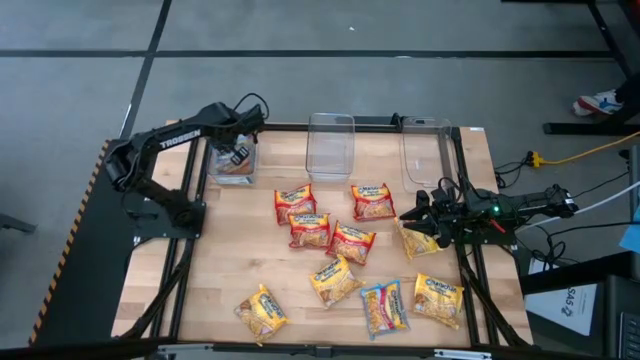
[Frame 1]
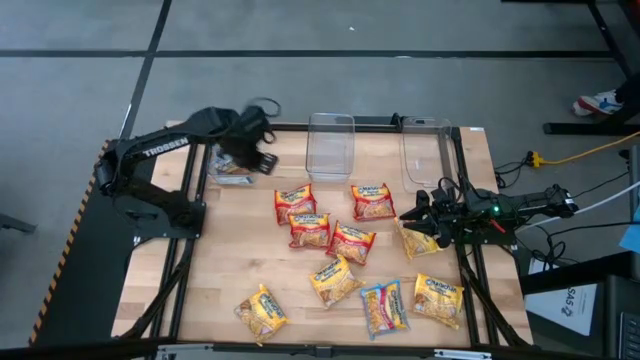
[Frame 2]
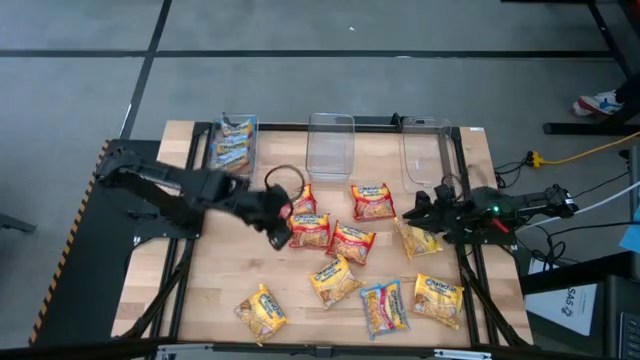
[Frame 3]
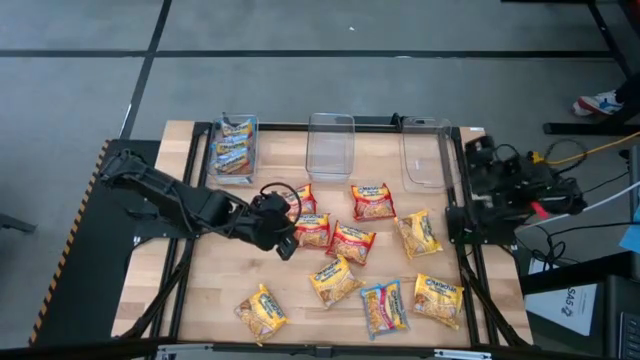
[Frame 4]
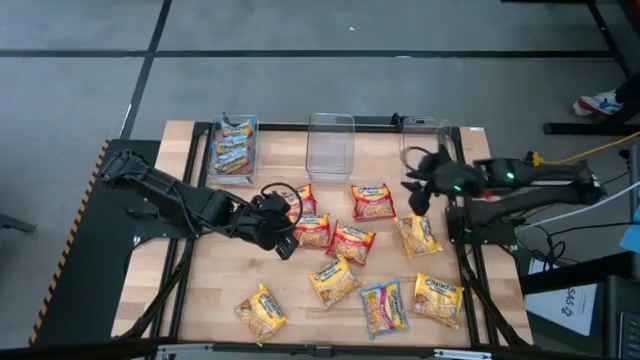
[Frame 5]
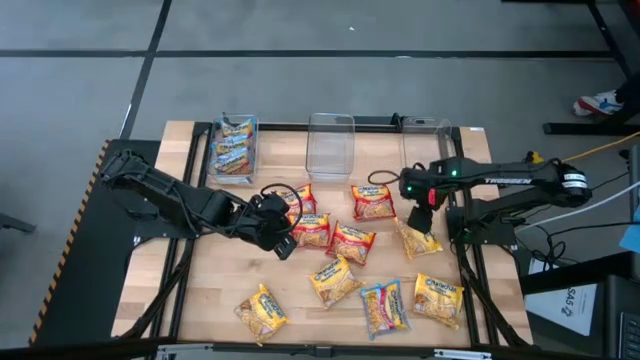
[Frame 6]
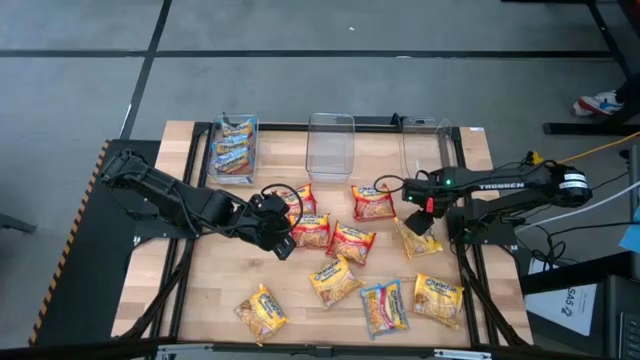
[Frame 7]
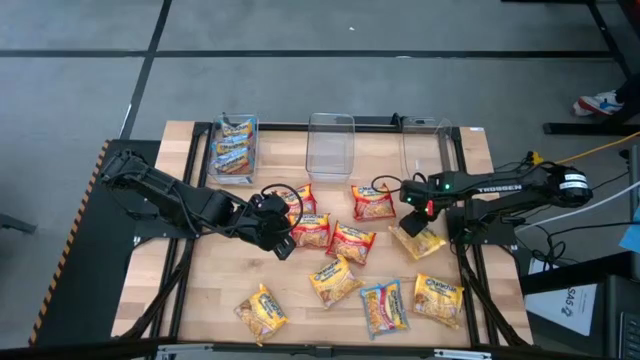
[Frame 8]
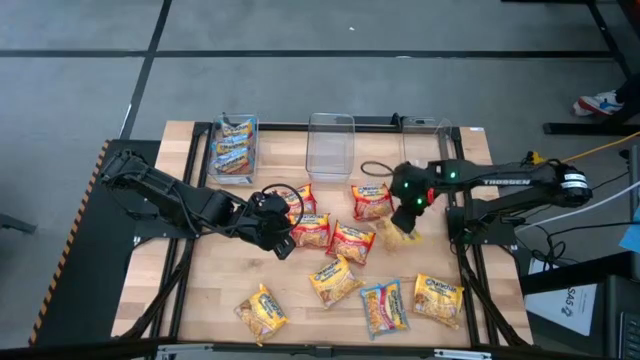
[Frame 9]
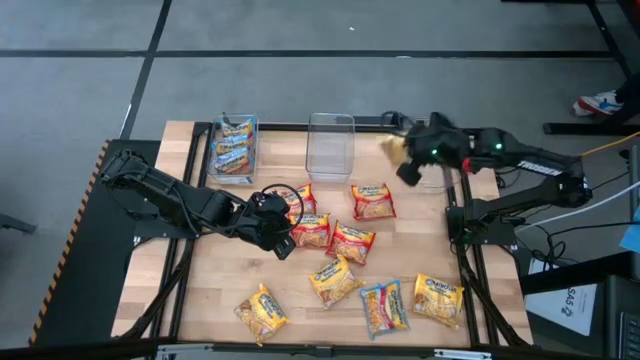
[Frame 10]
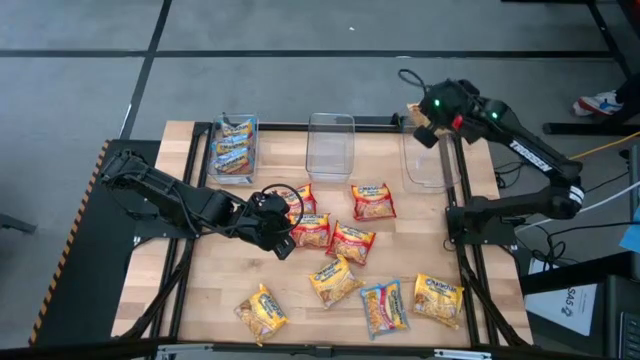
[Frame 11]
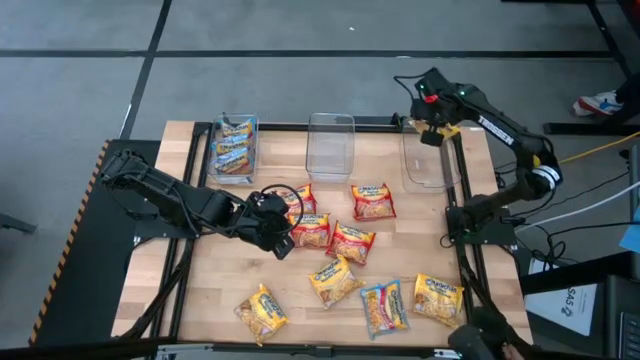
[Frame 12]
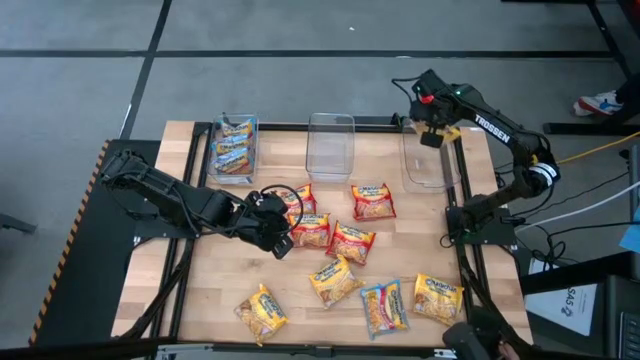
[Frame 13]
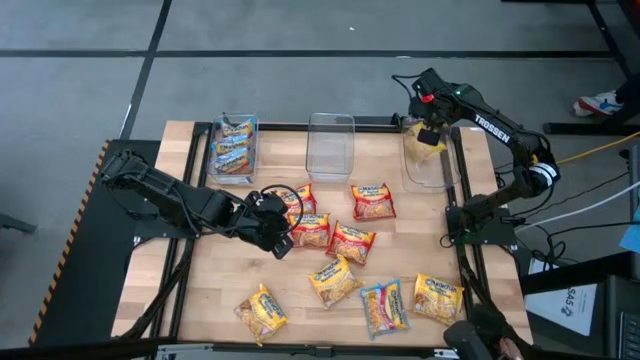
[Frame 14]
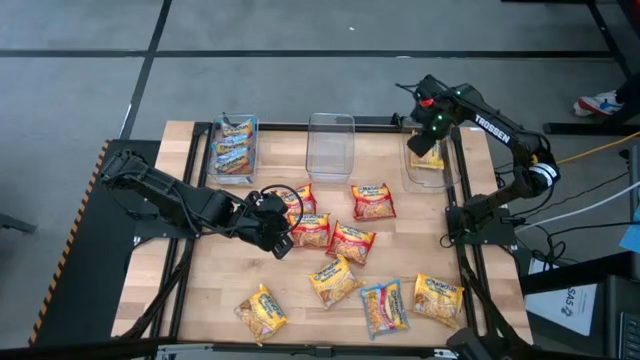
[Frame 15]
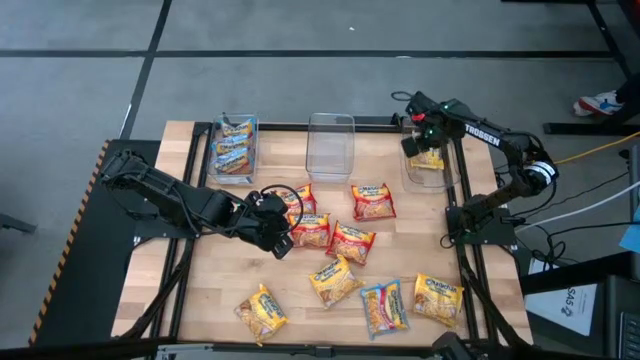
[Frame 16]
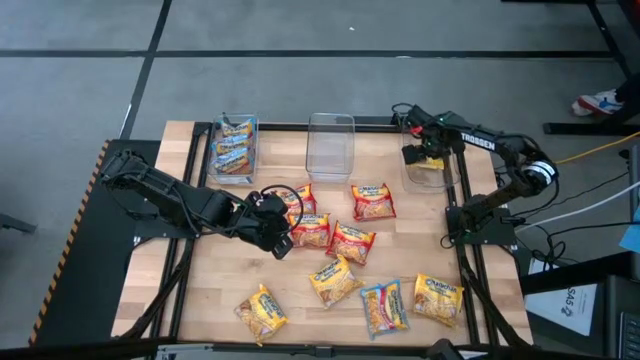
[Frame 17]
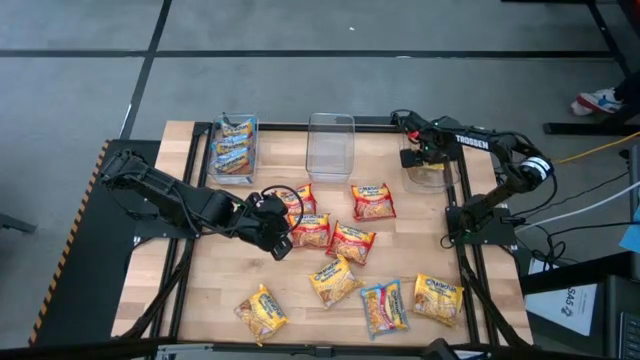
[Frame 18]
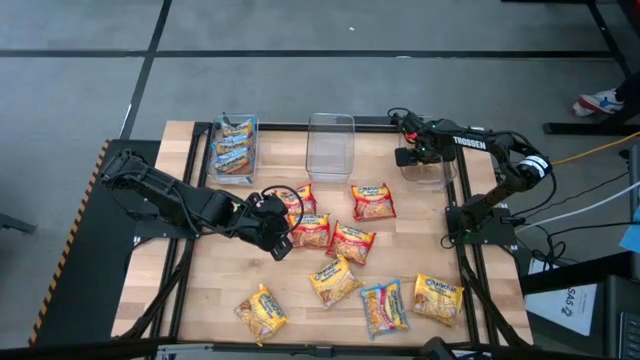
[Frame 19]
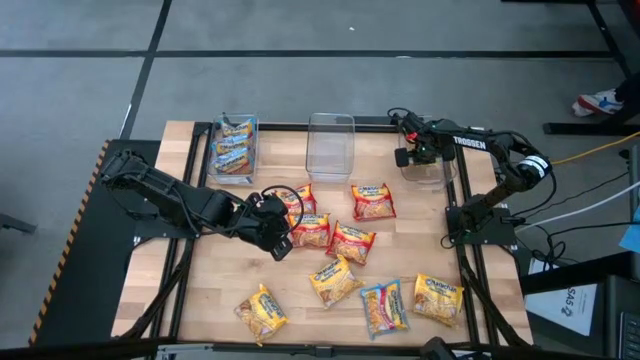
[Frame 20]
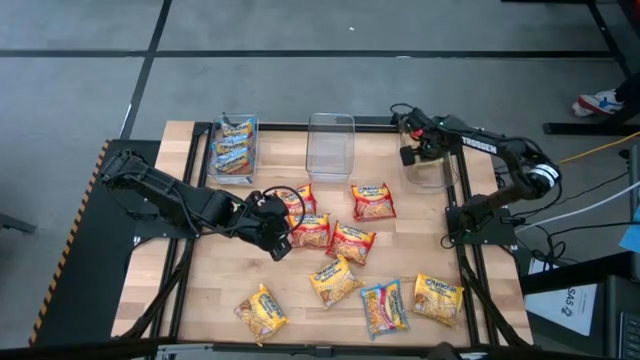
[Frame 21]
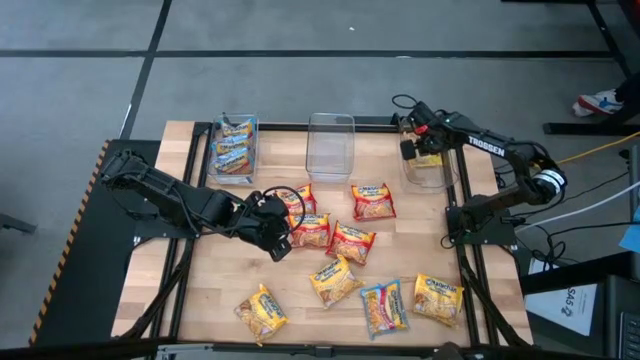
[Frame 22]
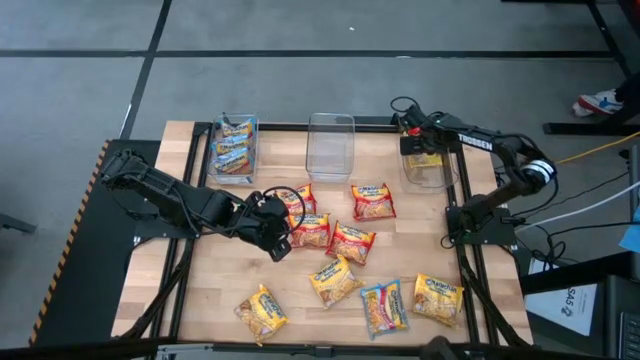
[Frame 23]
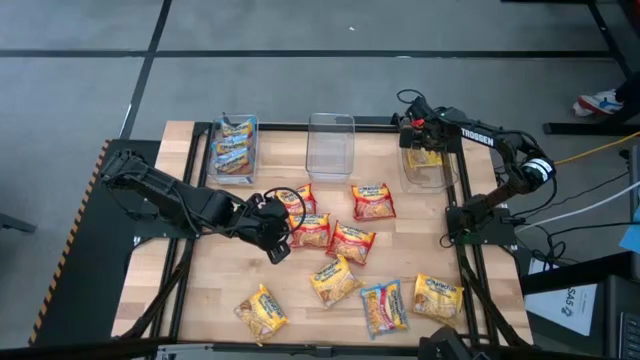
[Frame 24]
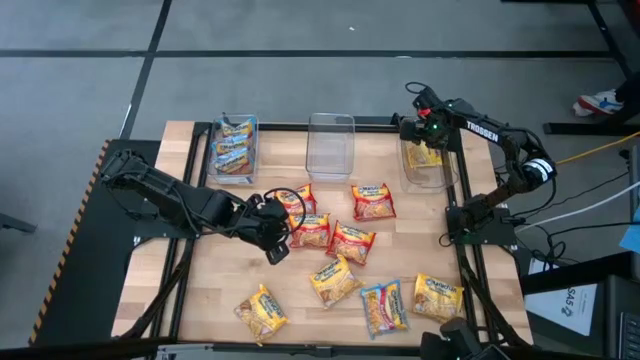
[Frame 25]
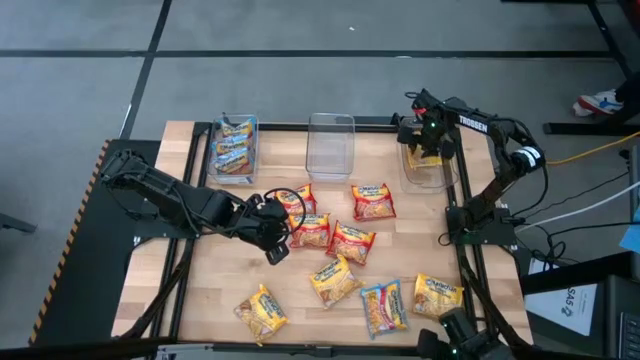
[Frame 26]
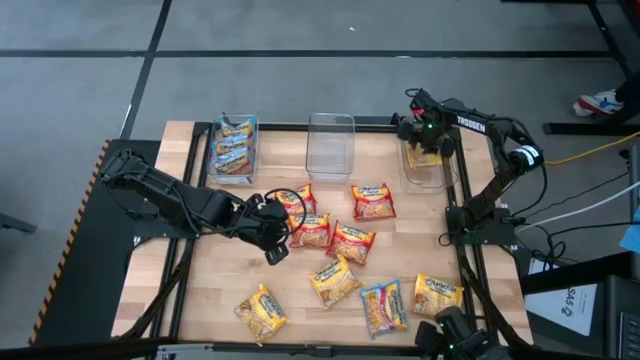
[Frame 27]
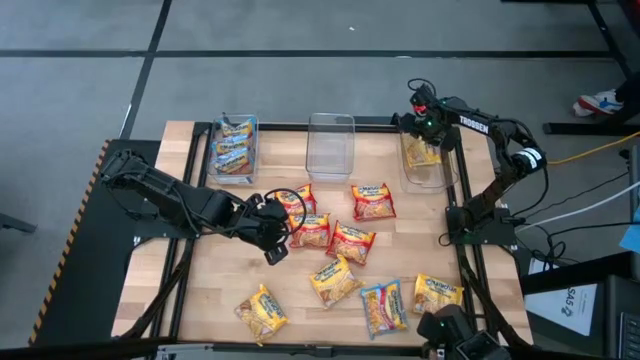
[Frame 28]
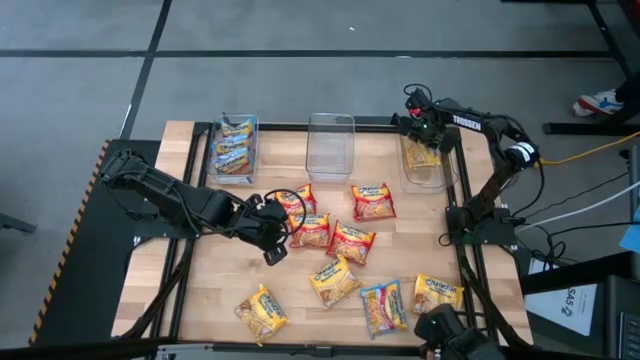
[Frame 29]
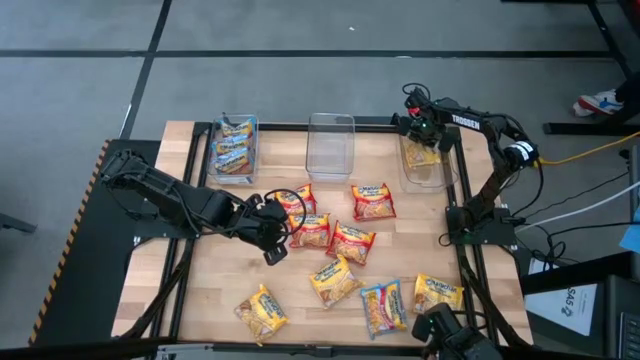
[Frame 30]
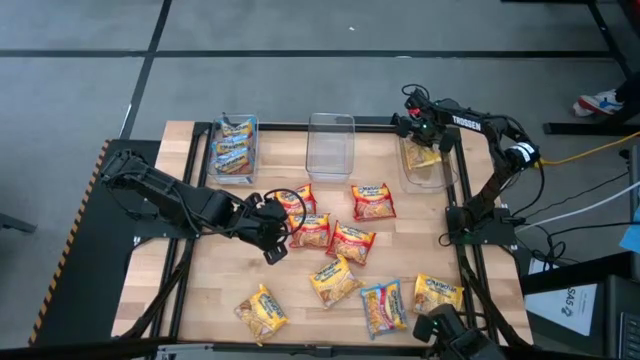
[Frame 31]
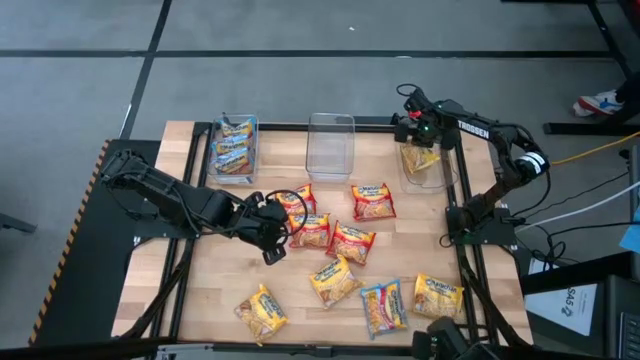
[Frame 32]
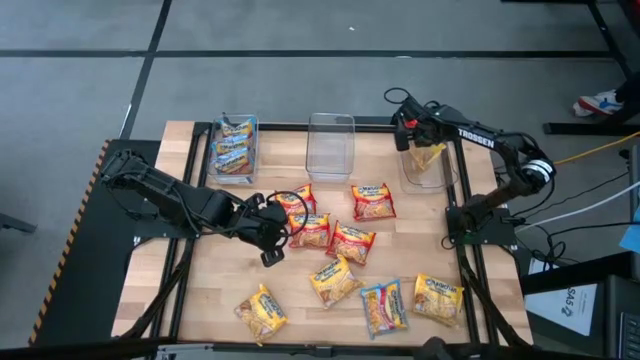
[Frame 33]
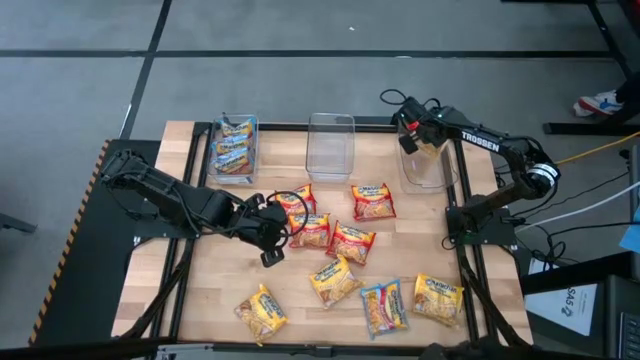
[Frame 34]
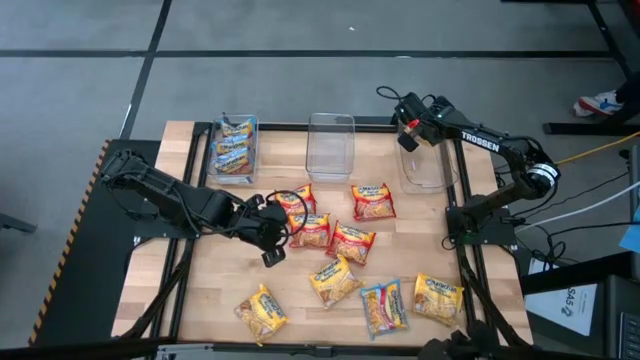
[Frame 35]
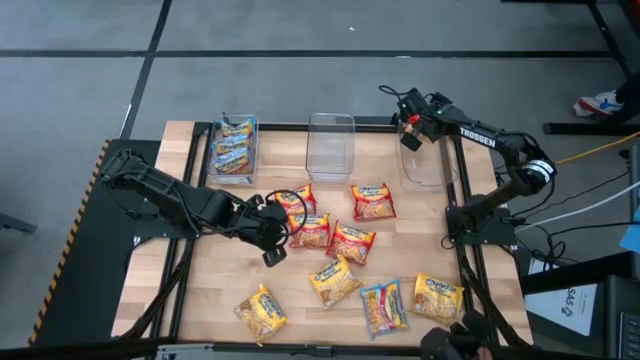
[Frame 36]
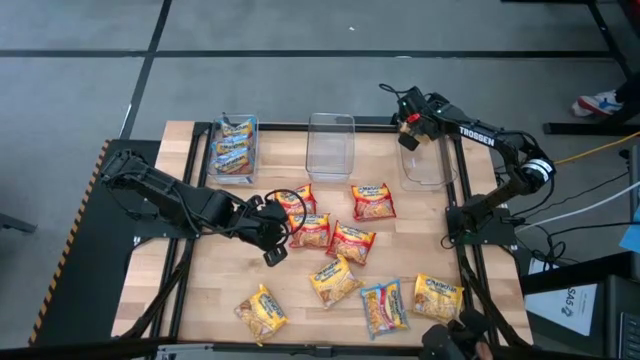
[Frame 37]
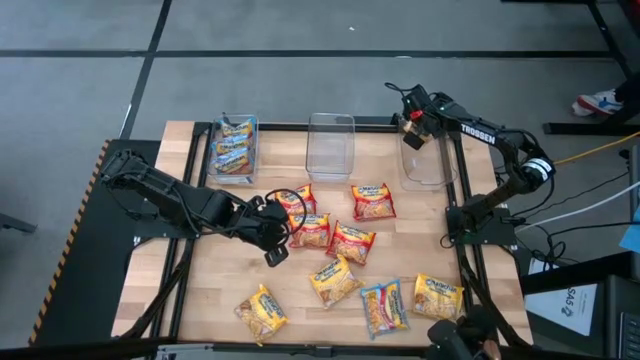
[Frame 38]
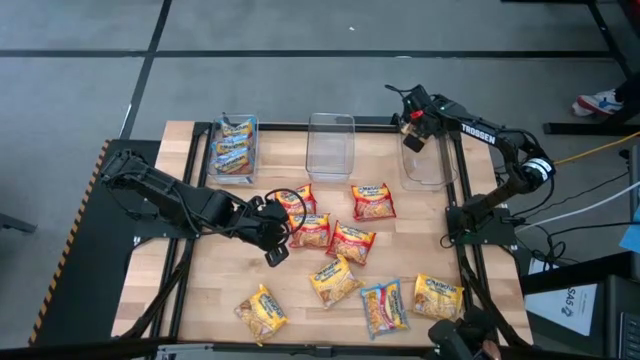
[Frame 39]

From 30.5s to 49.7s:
Task: Sort Maruchan noodles
Put the yellow noodle pack in the right transparent basket

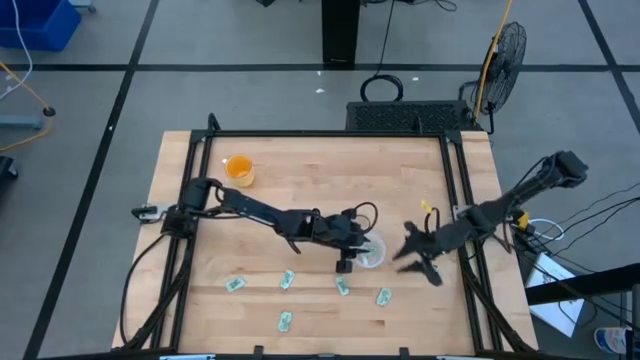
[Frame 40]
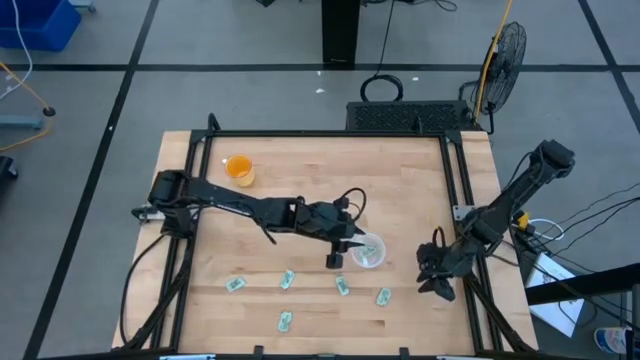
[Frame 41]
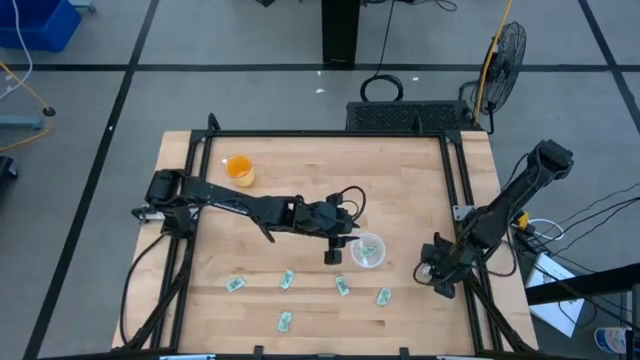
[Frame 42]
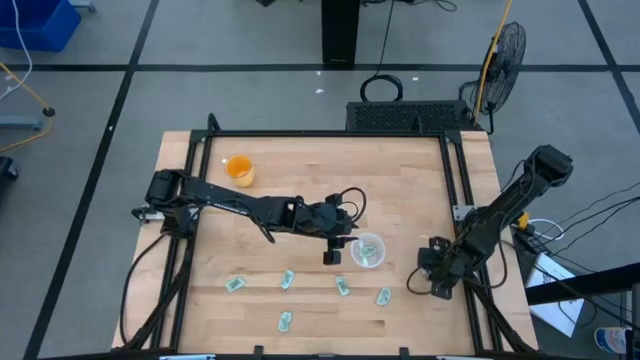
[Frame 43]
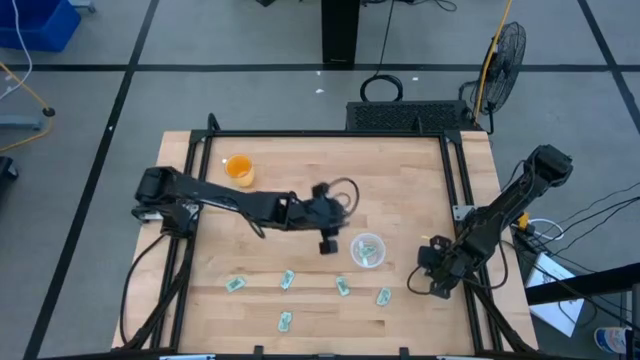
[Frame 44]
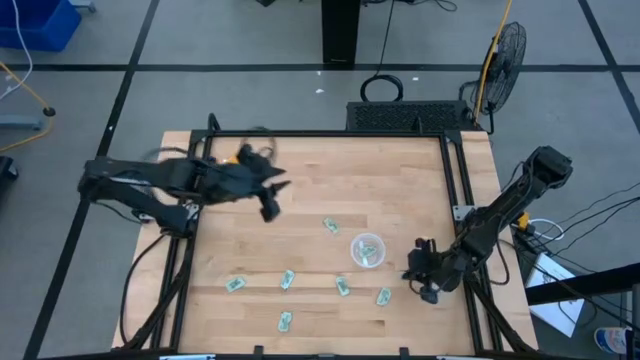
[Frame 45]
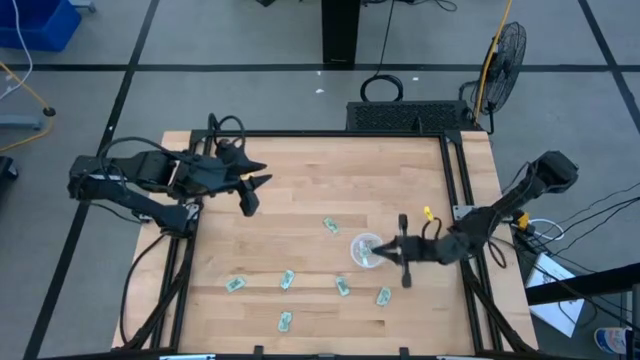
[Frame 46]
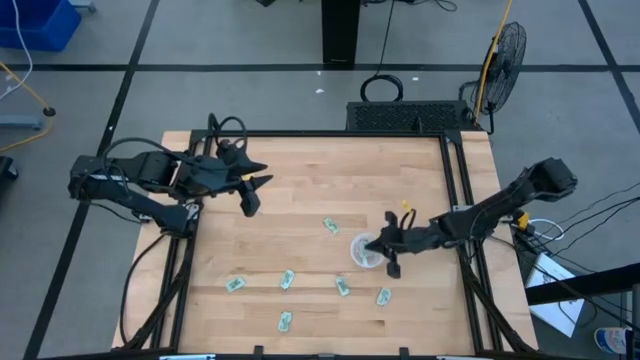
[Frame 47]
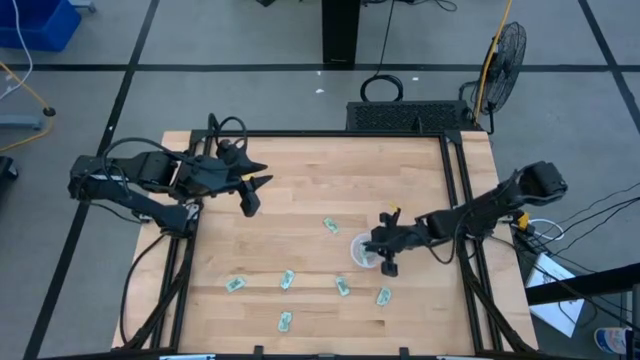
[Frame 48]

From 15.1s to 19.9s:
Task: Pick and place Stevia / Truvia into bins
Put the truvia packet into the transparent container
